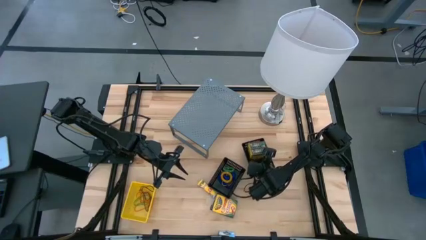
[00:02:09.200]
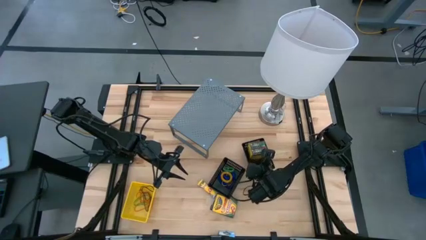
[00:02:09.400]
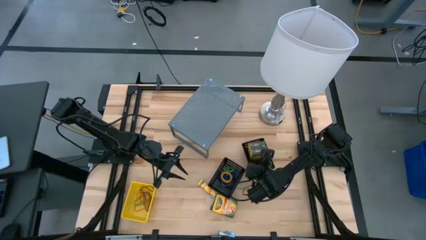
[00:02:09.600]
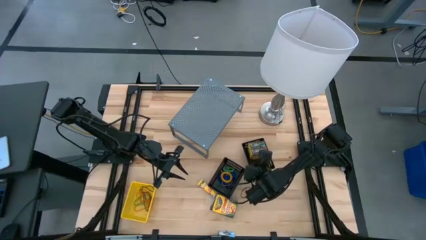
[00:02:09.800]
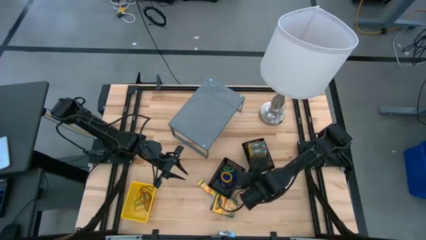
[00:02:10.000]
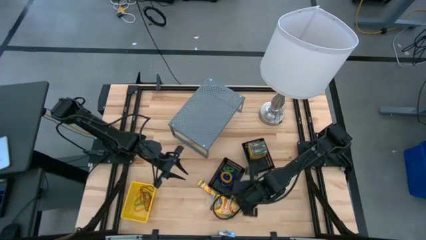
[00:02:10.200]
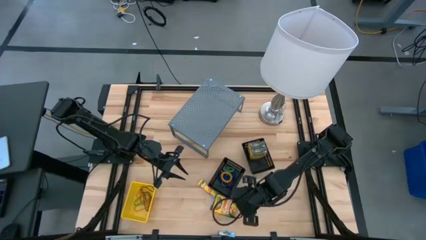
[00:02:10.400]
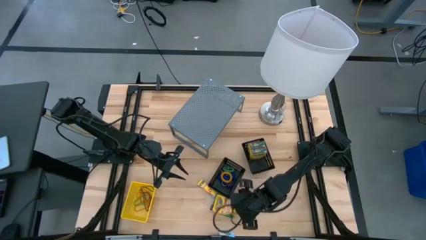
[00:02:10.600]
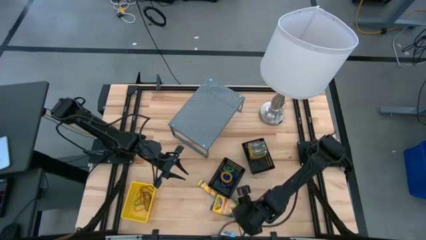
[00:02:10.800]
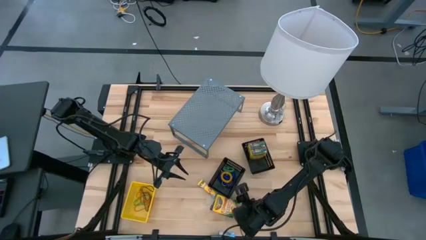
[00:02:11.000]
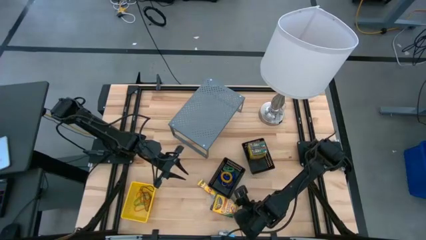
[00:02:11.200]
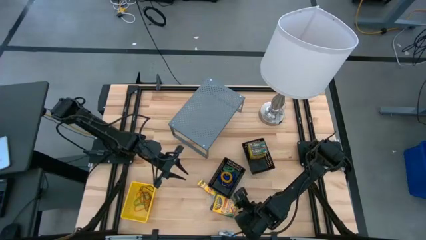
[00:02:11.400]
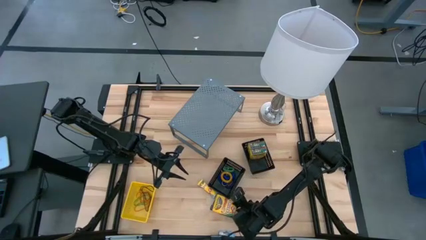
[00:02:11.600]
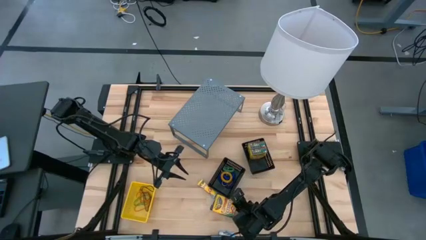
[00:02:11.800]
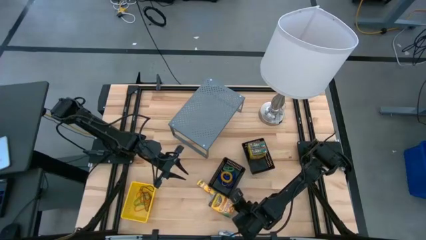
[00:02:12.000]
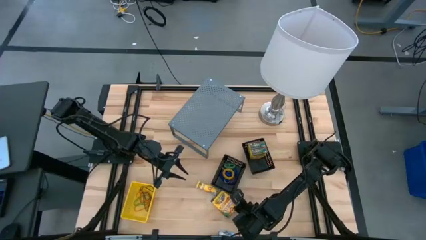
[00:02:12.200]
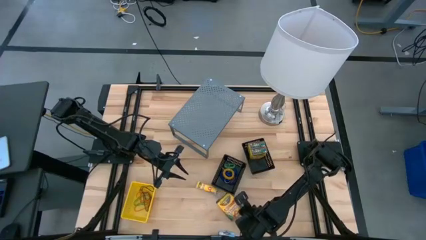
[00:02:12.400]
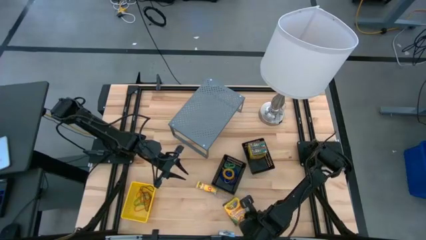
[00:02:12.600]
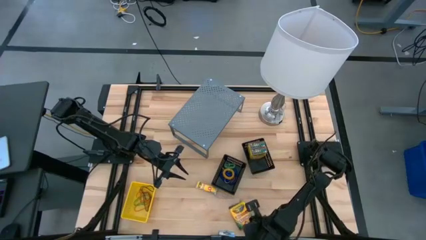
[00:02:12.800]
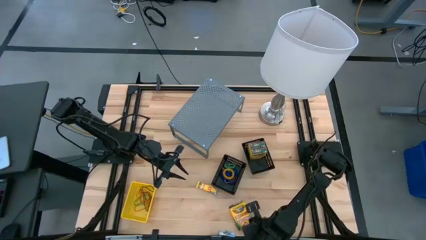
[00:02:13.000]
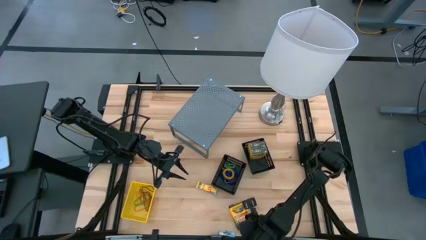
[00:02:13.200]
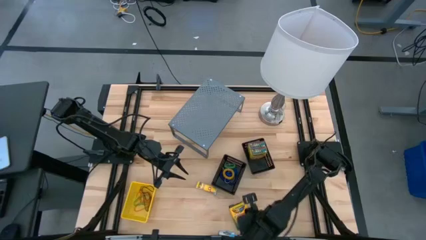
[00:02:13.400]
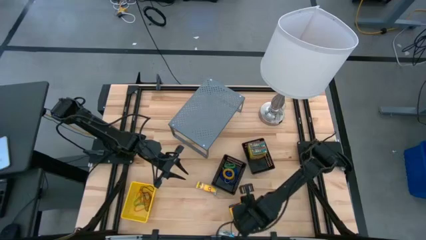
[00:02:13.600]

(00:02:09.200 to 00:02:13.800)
Task: Pick & Place Office Desk Supplies
Put the box of crayons into right black bin

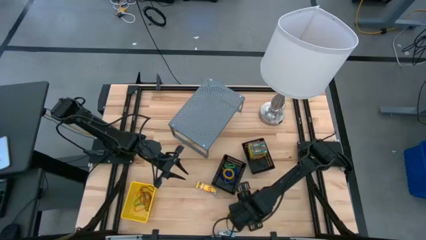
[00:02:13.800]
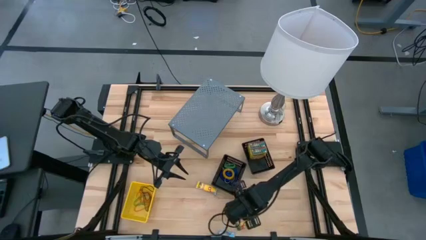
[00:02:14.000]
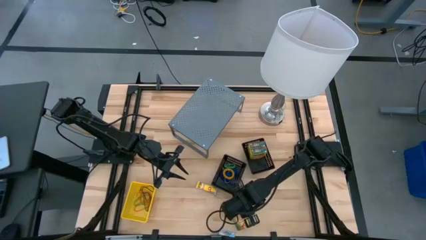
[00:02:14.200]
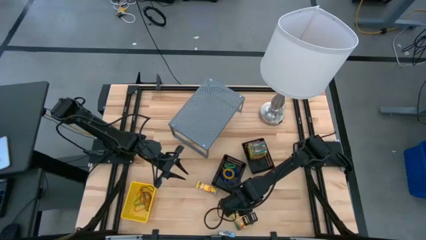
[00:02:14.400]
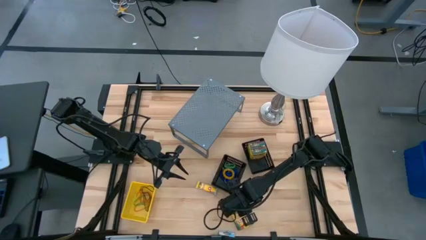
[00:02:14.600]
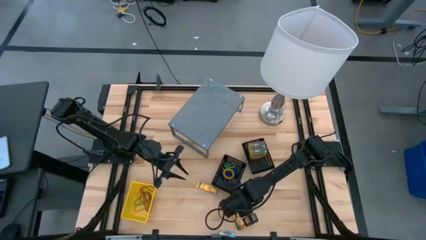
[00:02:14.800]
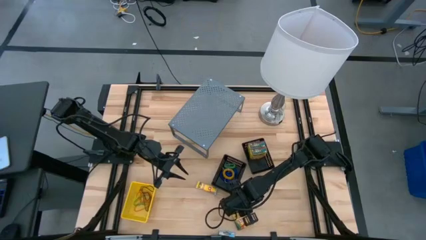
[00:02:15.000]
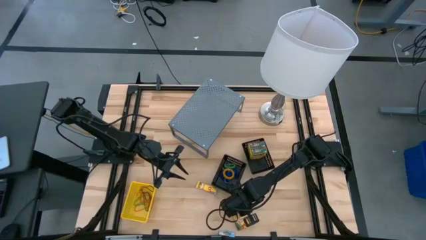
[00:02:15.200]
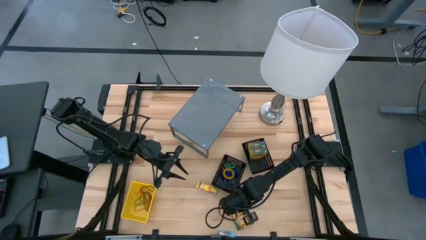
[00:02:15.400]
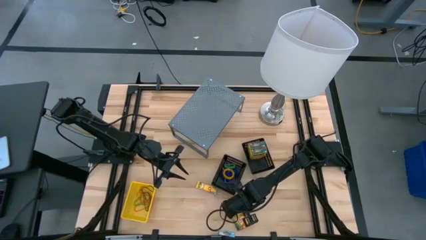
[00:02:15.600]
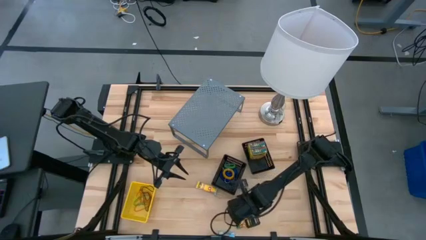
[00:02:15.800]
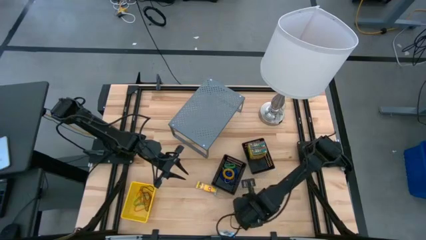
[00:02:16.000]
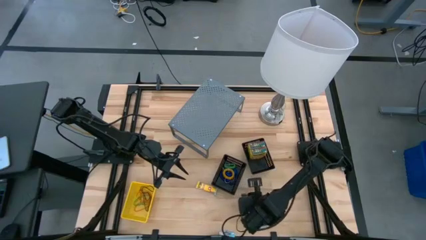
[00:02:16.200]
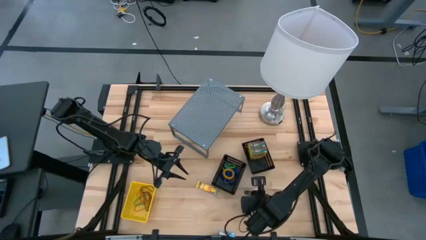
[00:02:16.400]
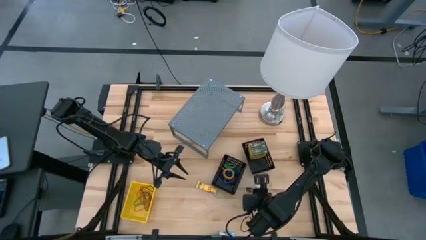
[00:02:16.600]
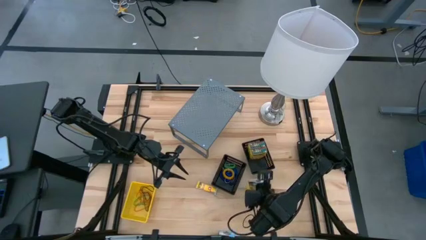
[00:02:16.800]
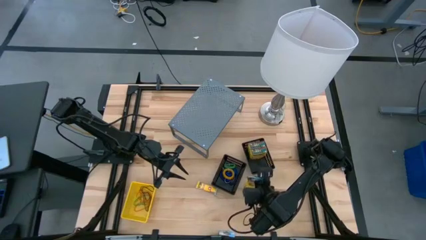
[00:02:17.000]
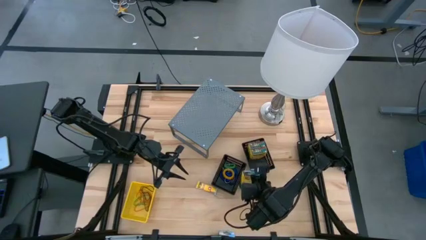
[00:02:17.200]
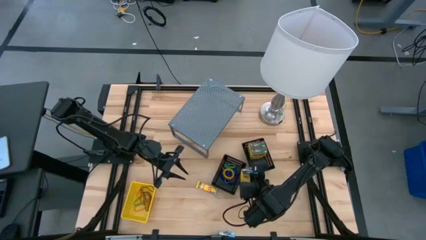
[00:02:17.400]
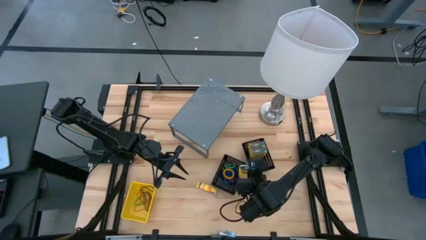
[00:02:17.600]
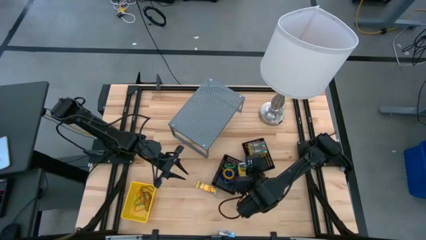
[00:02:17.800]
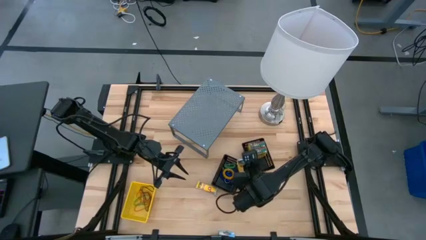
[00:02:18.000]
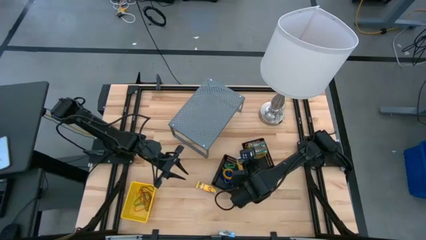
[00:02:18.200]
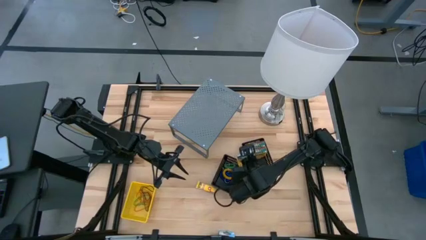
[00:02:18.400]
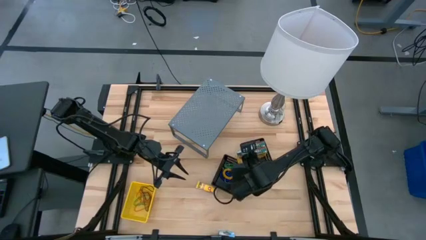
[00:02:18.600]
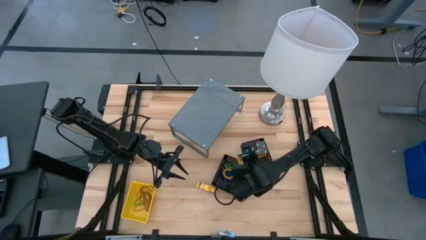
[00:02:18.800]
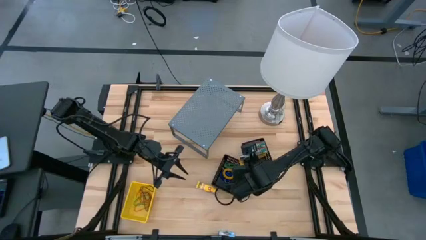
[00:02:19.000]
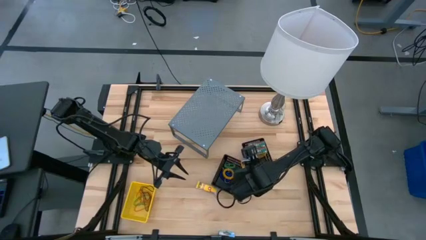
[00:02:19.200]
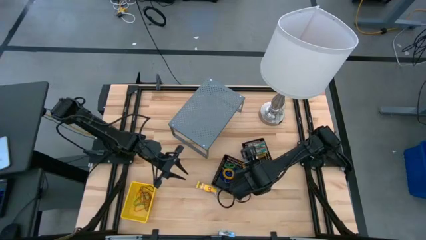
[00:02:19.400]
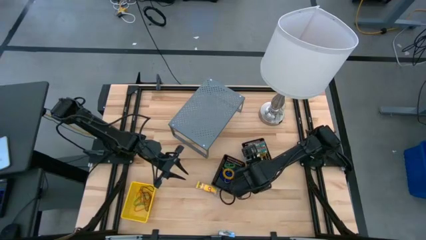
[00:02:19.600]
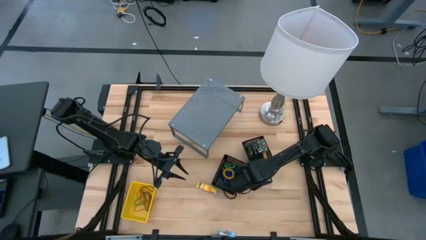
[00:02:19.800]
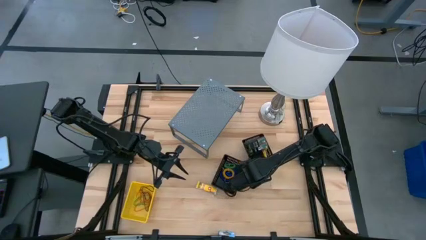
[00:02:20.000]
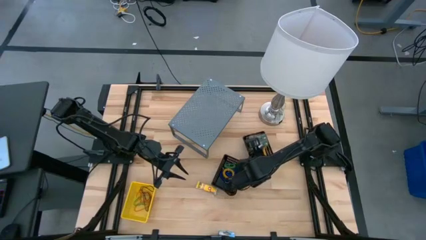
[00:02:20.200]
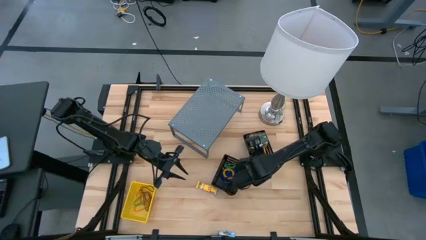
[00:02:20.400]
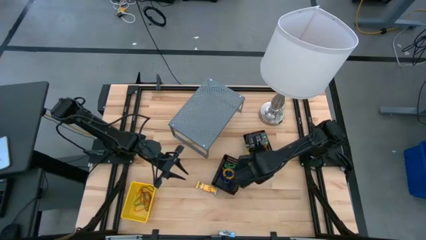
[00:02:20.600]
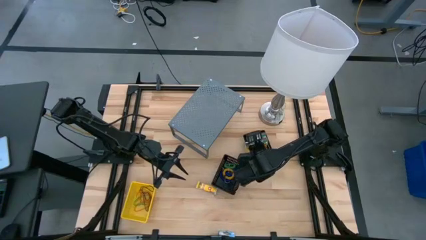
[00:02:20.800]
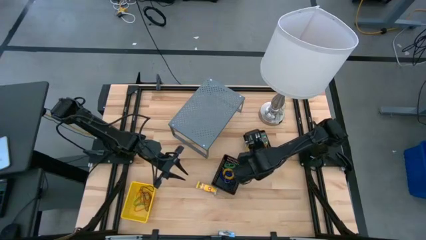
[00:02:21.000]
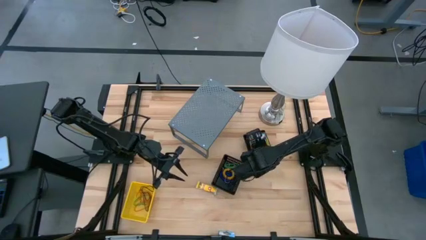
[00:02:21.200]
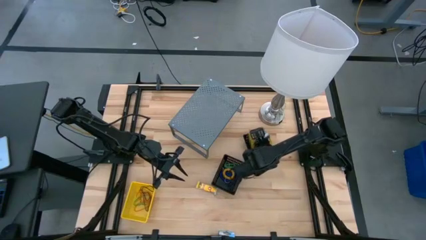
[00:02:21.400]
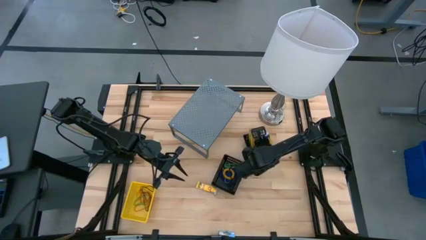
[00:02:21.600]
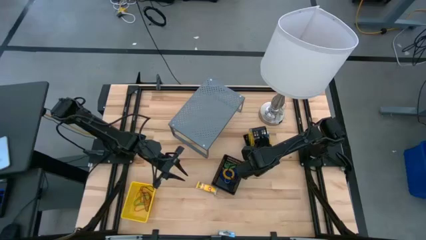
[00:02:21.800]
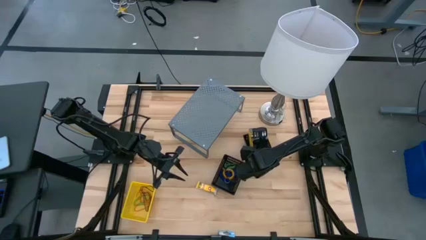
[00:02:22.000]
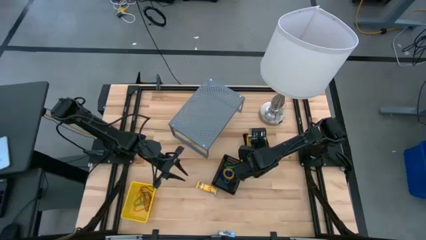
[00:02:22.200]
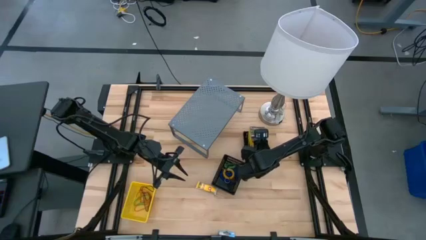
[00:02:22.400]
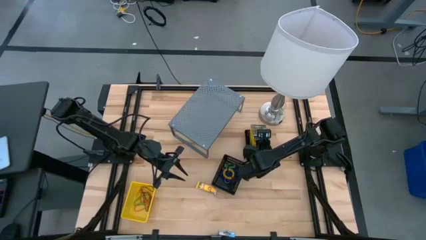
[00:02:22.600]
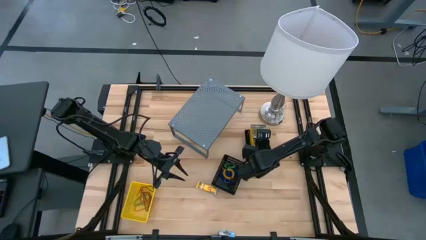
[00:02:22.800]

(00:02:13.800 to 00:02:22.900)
Put the box of crayons into right black bin

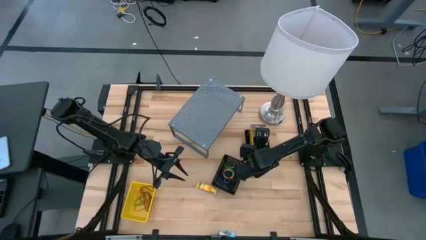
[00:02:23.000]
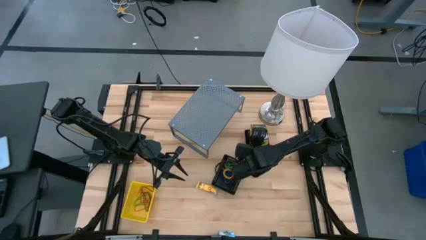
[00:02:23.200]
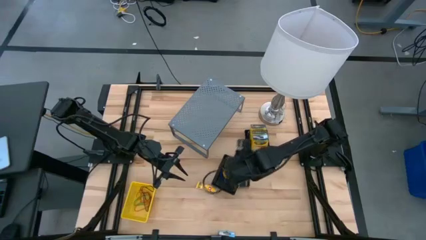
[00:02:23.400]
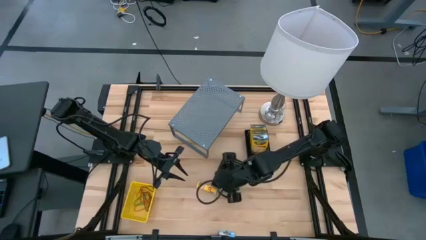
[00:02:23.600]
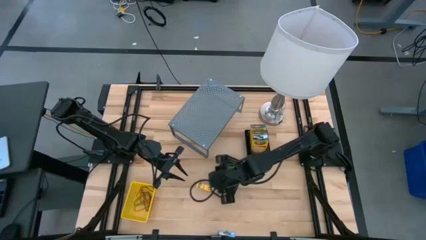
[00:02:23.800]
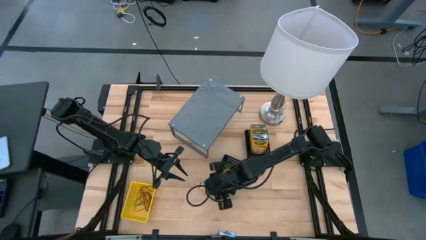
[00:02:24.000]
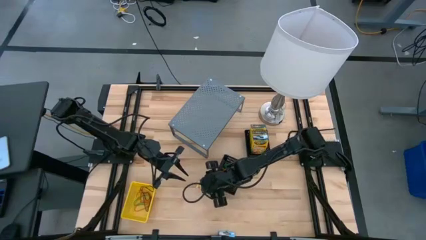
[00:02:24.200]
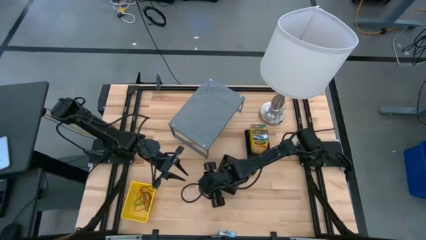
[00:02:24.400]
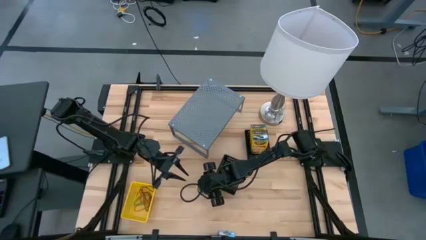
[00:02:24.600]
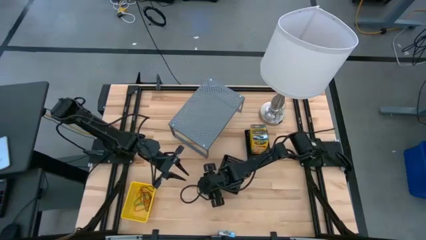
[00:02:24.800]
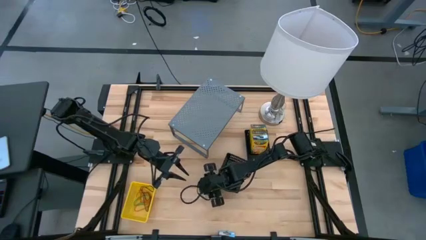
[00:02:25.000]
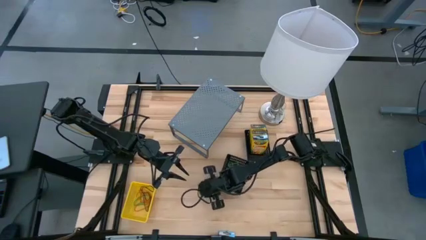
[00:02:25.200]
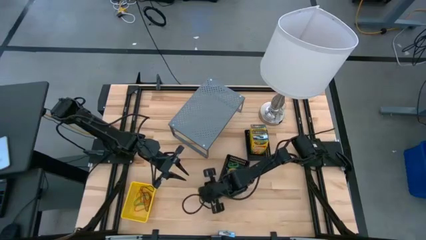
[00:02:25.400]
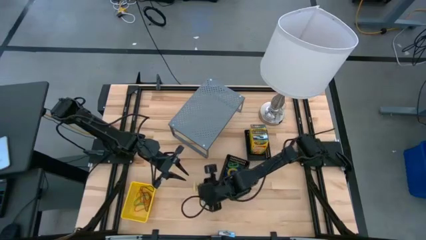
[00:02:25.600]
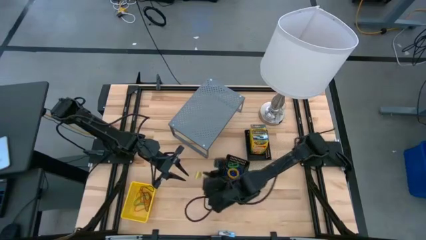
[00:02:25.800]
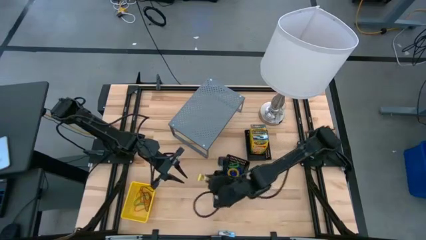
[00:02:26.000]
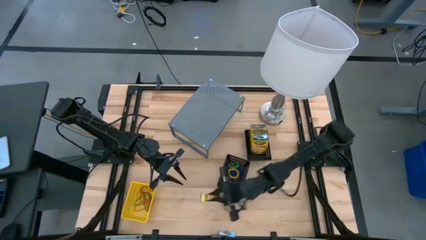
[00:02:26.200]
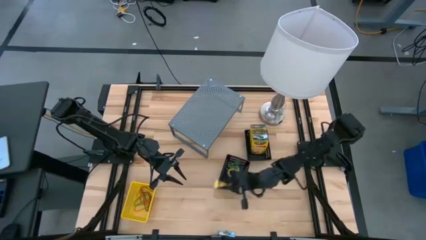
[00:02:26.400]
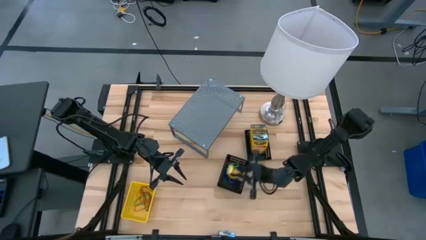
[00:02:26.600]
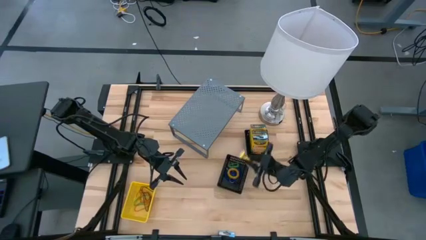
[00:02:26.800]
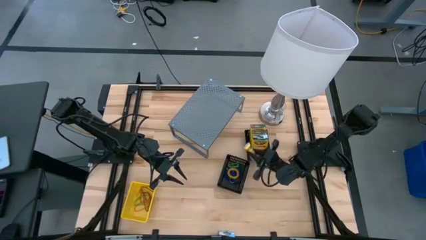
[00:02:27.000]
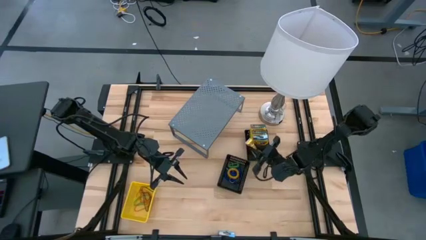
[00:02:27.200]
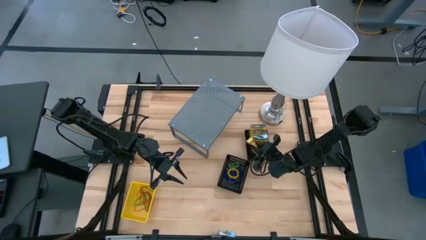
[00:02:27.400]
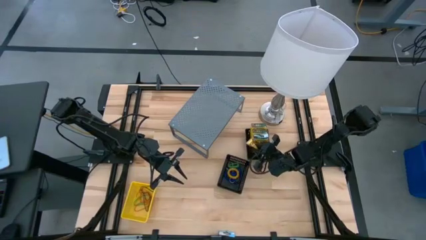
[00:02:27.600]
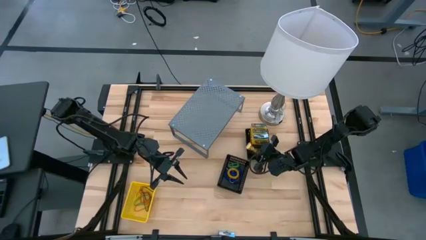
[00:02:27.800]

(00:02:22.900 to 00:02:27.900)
Put the box of crayons into right black bin
